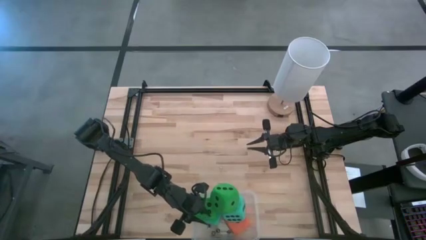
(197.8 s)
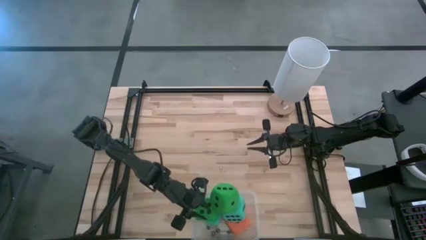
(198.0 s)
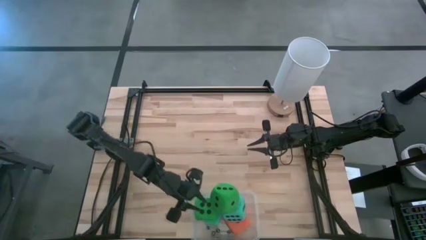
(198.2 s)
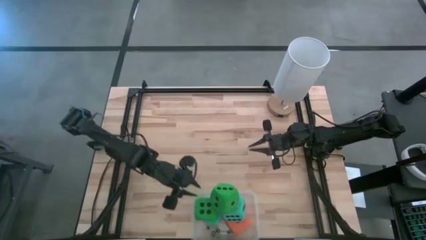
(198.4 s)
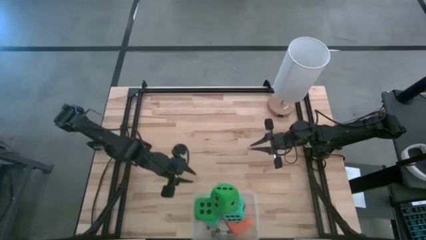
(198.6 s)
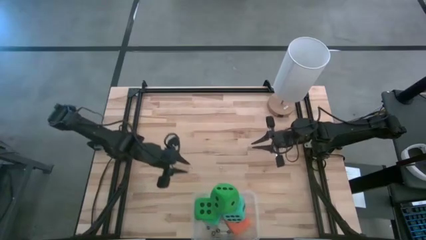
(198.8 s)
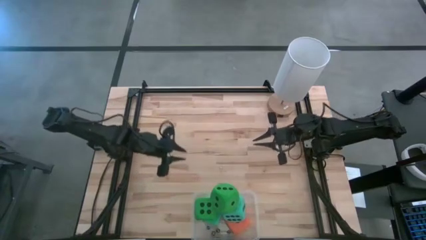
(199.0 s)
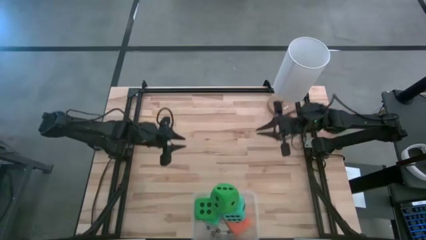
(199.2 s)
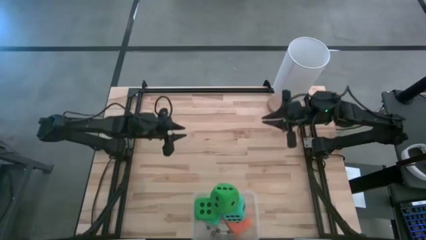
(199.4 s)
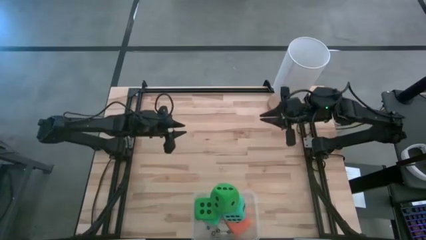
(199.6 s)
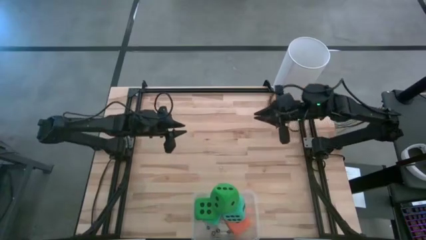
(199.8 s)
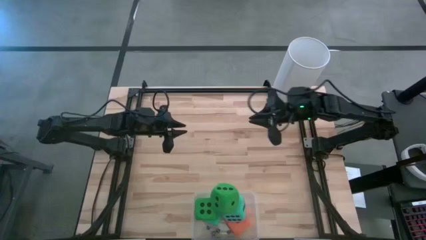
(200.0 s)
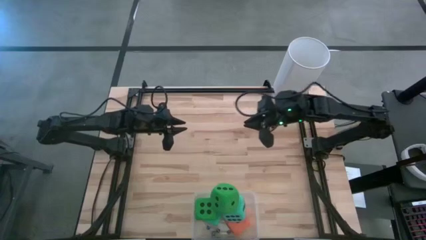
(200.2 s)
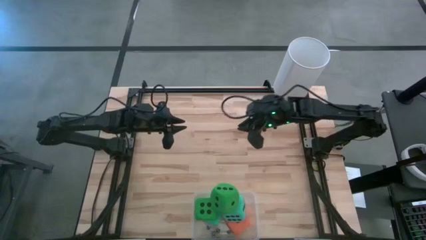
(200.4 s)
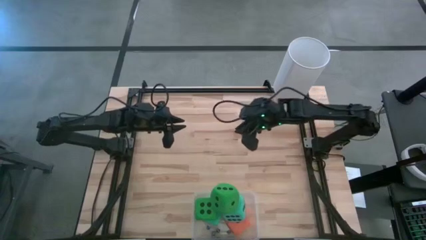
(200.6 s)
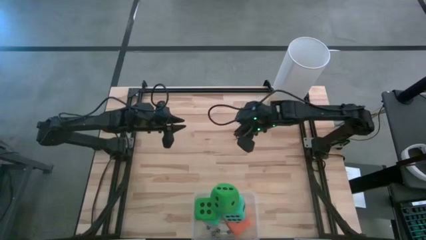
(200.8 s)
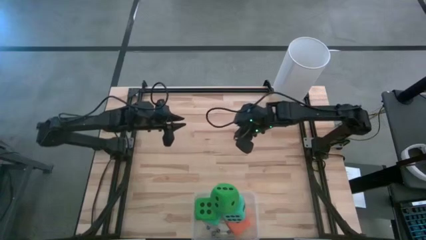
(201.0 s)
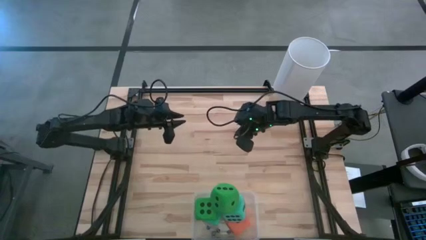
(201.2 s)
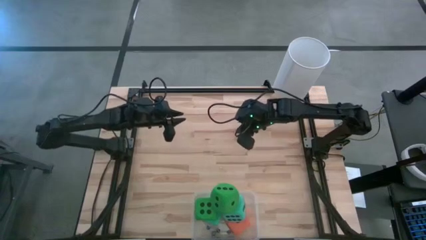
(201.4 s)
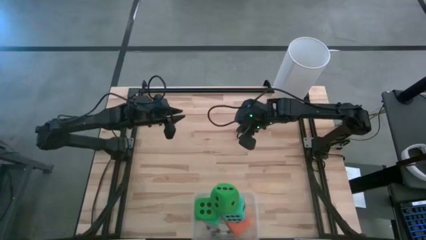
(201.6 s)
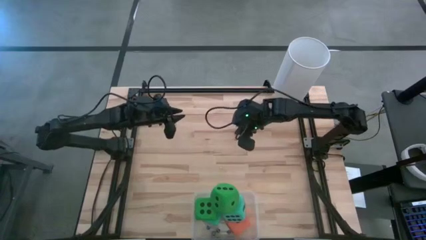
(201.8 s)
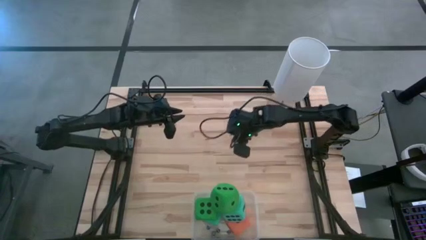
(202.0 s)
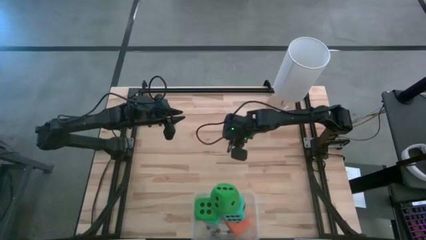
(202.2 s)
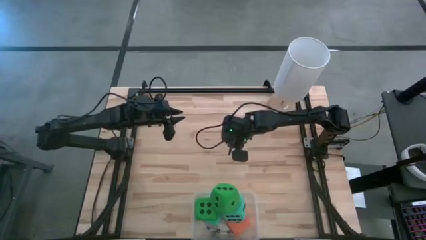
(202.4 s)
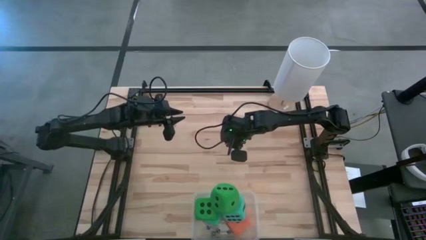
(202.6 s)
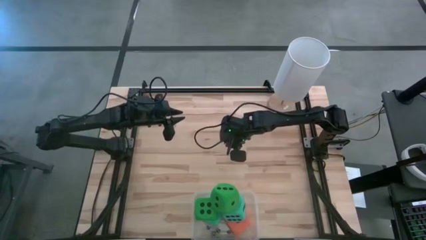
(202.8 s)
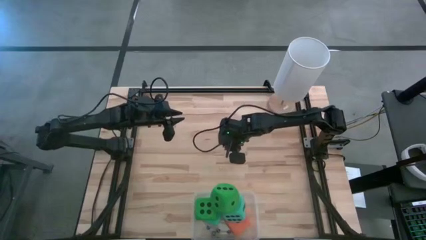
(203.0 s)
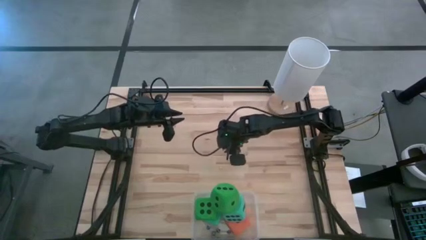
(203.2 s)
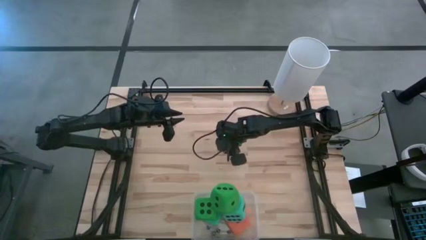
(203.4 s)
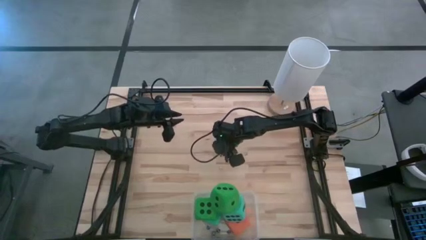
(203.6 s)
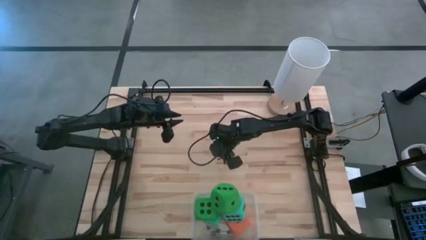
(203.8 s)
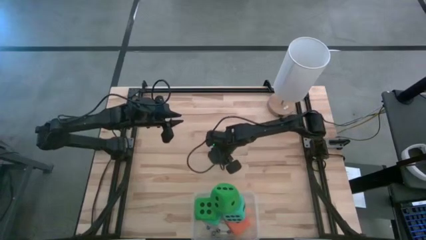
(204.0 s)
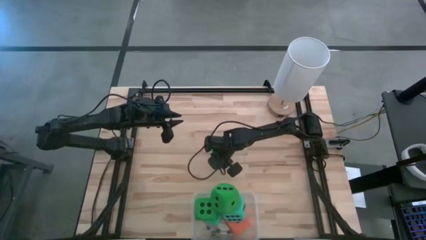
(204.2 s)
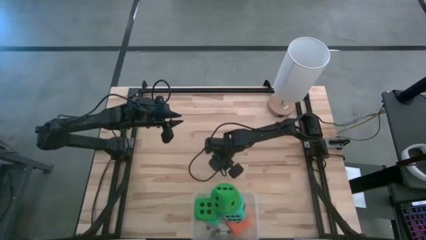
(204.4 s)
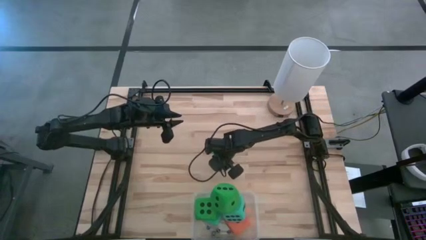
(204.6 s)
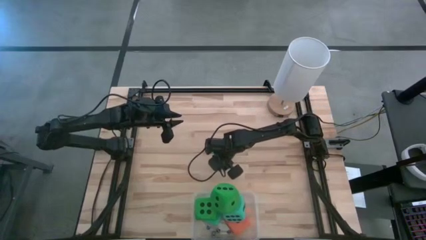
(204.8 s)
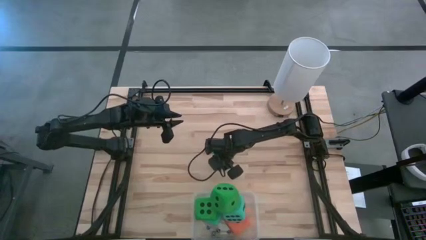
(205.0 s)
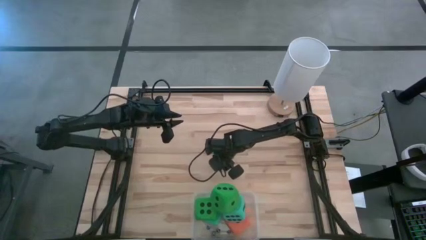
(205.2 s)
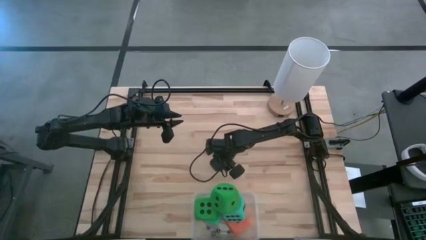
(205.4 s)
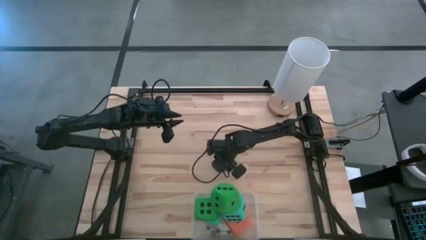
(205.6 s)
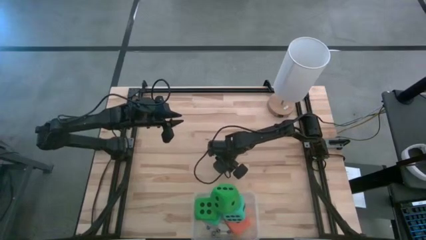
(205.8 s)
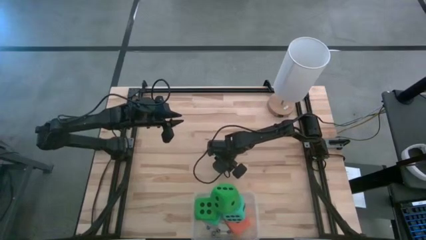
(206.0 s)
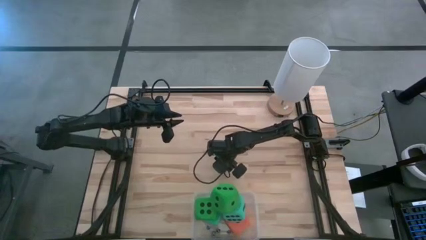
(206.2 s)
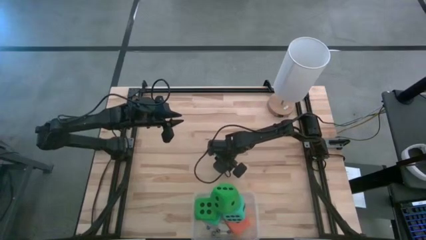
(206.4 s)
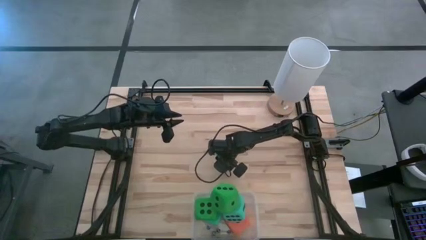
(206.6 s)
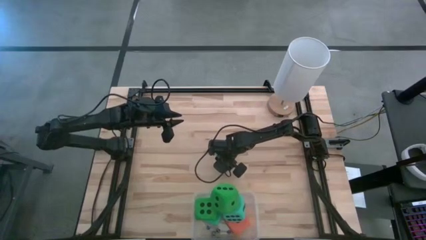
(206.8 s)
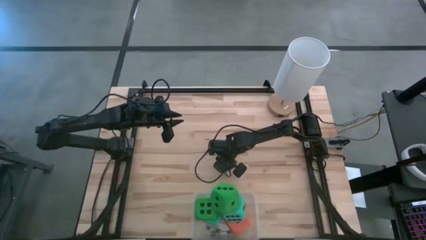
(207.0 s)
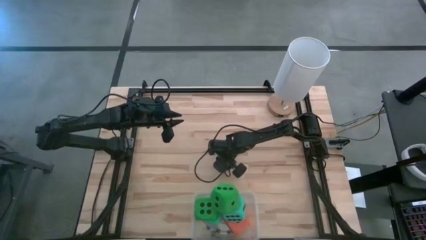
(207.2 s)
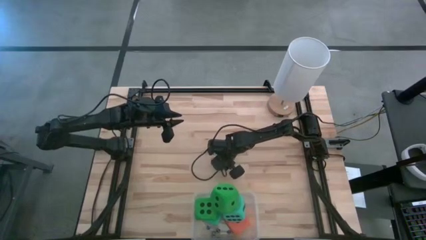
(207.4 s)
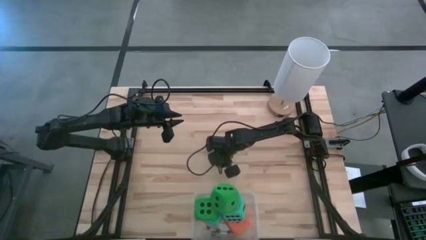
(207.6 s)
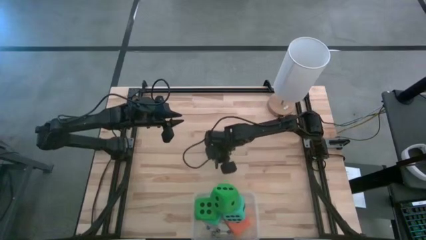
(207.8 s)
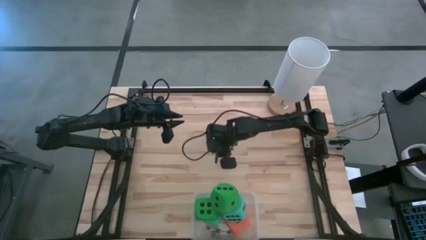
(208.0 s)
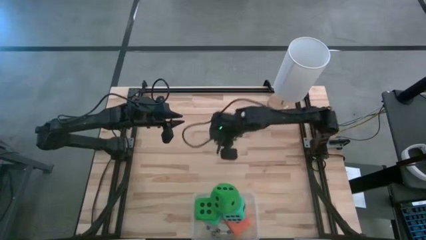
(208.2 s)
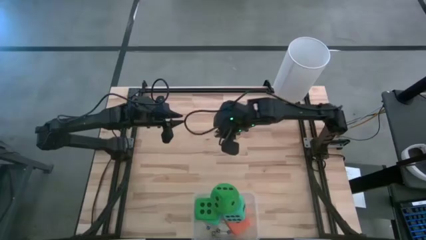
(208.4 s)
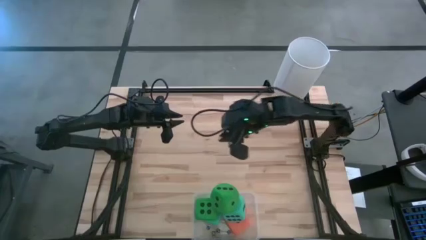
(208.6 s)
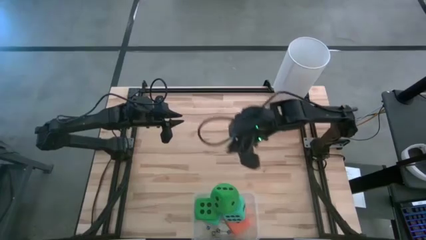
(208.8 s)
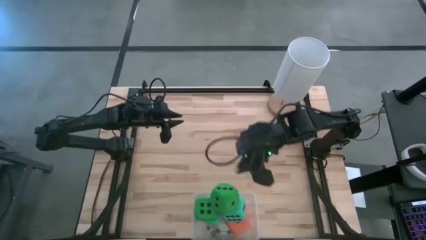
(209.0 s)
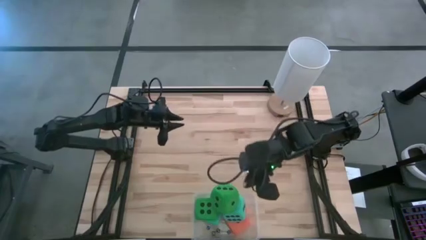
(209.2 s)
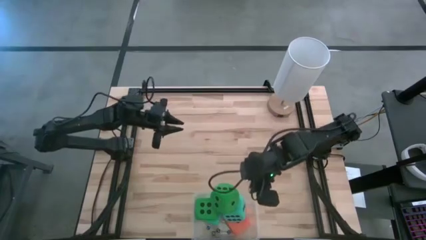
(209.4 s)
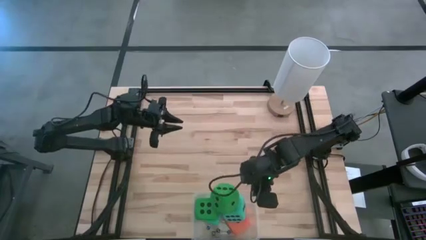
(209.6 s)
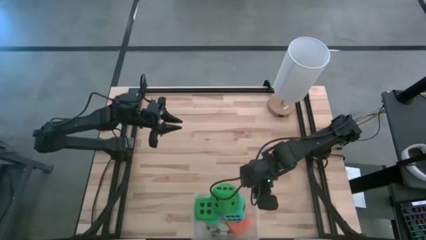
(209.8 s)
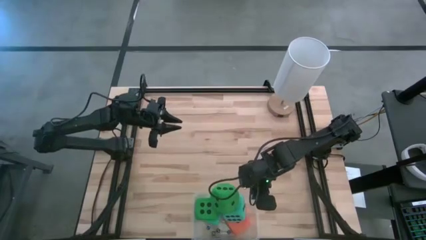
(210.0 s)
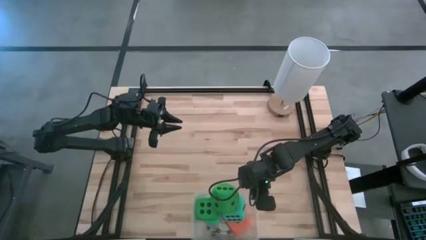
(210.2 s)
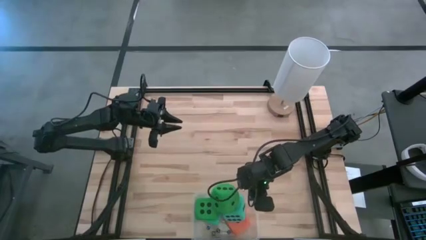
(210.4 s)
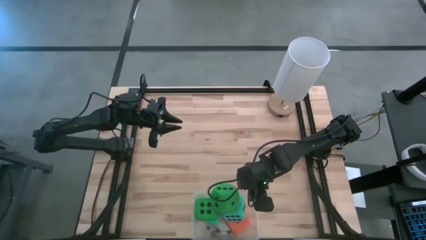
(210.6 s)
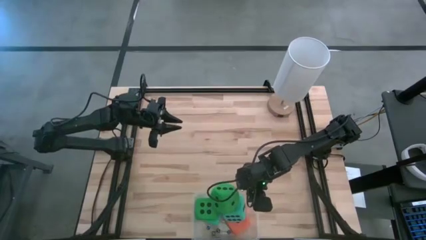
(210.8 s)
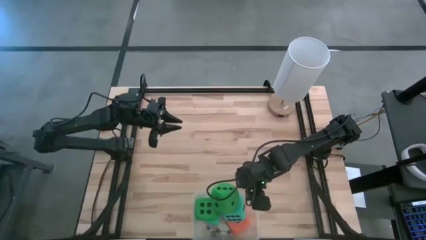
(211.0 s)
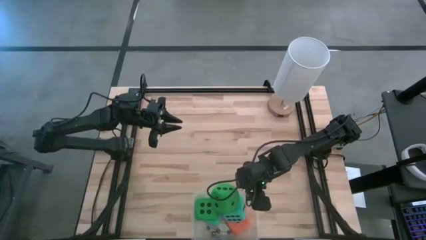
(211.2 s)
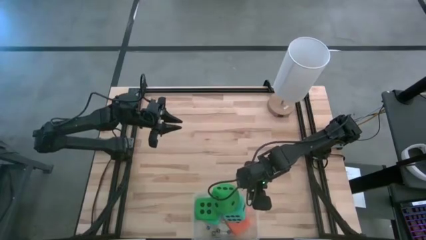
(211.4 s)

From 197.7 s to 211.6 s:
Task: Pick & Place Dice
Put the small yellow dice into the transparent bin

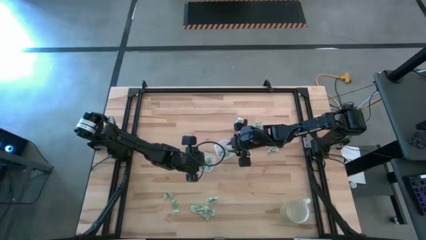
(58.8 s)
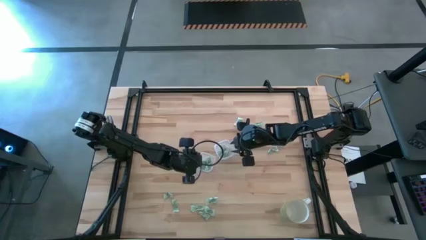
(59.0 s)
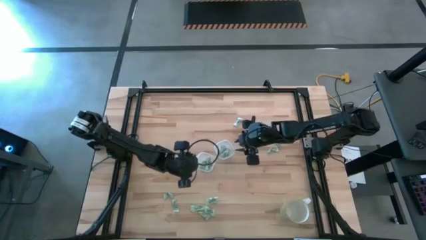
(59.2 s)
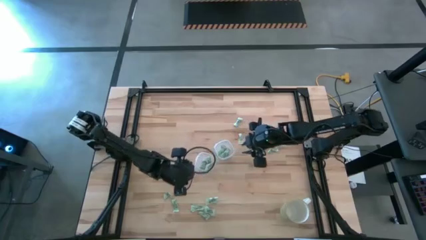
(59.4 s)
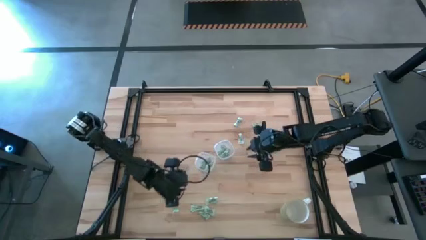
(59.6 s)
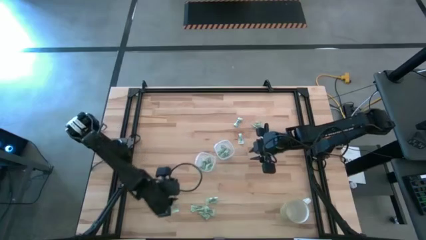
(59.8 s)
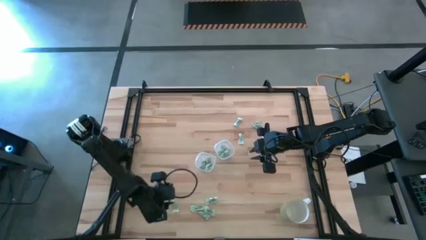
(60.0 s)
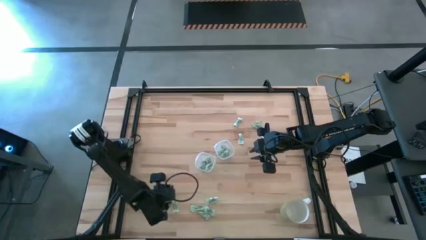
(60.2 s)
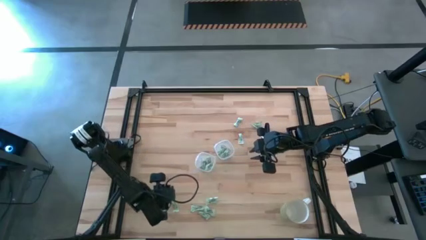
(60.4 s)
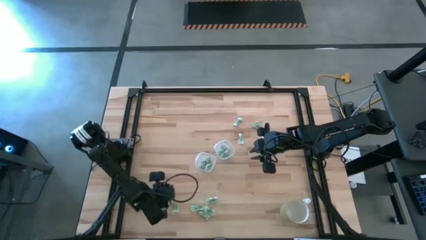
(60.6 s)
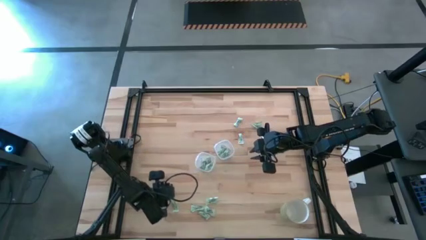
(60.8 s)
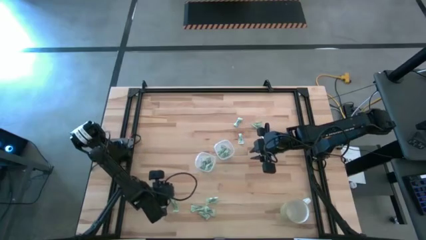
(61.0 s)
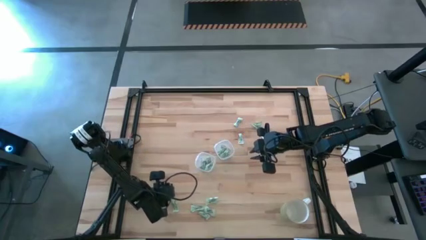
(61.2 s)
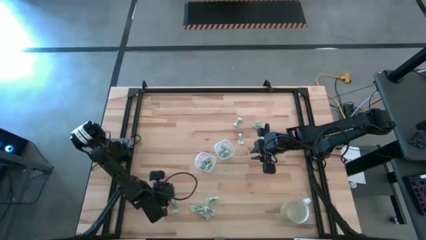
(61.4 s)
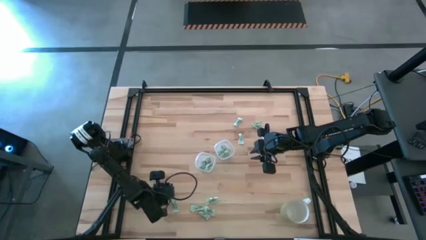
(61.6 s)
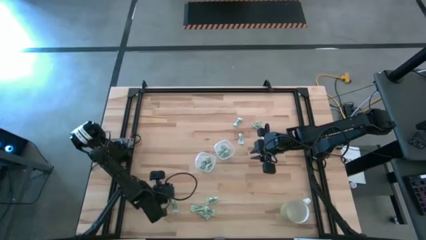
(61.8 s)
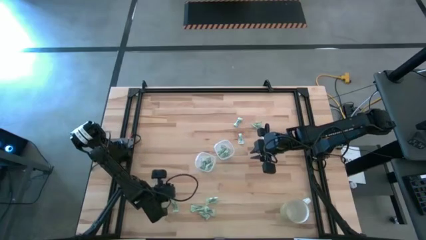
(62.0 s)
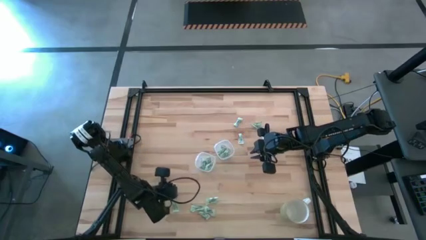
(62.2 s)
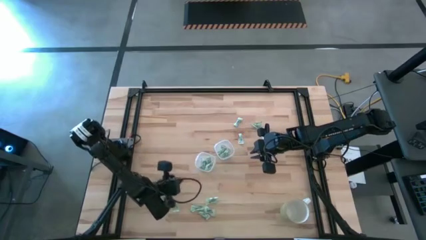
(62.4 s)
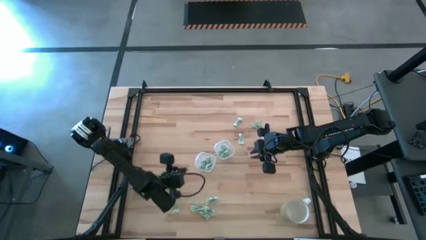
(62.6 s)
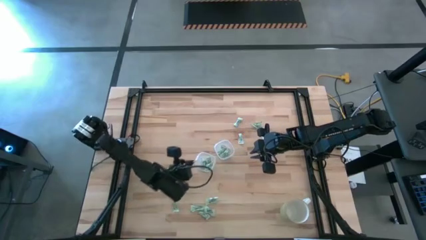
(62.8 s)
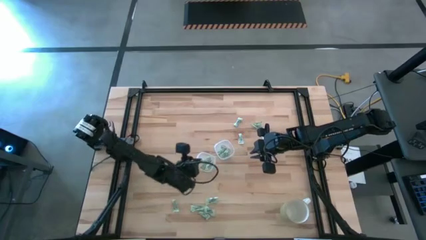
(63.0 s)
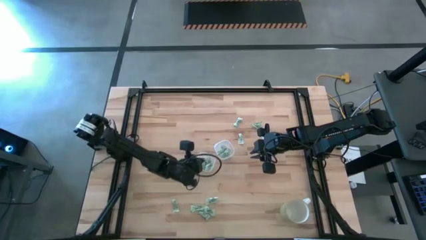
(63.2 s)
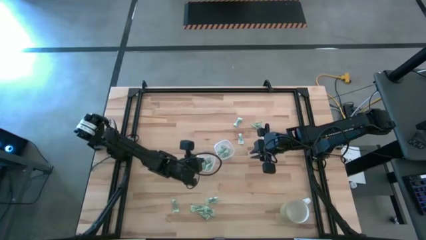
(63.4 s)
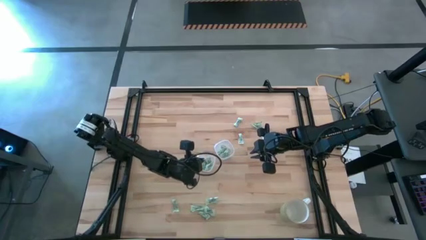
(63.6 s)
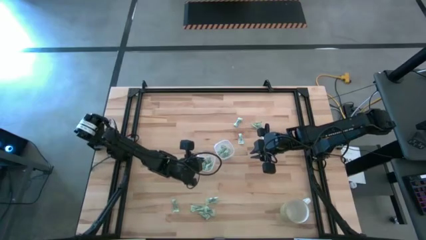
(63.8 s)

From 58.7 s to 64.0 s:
Task: Pick and place items into bin
Put the stevia packet into the left bin
